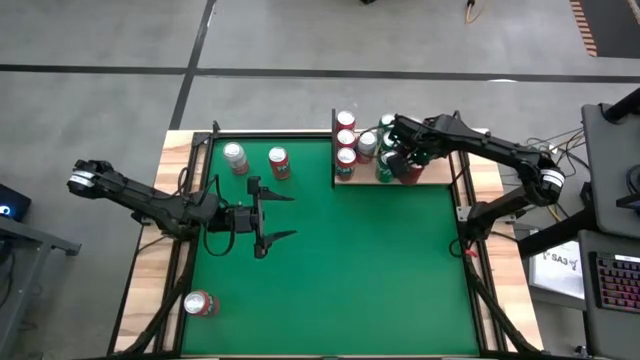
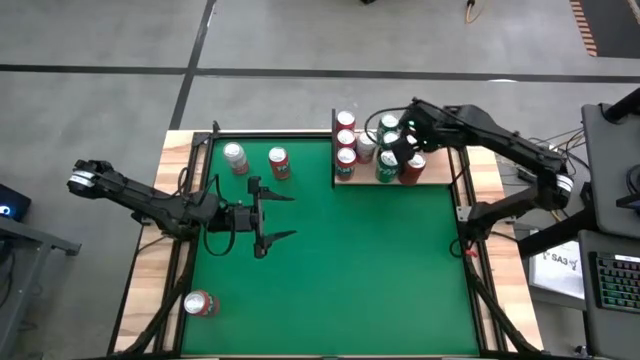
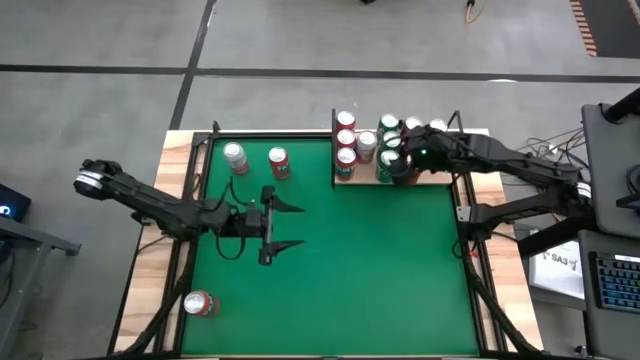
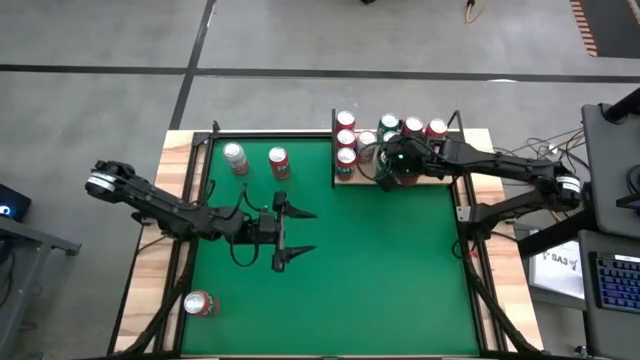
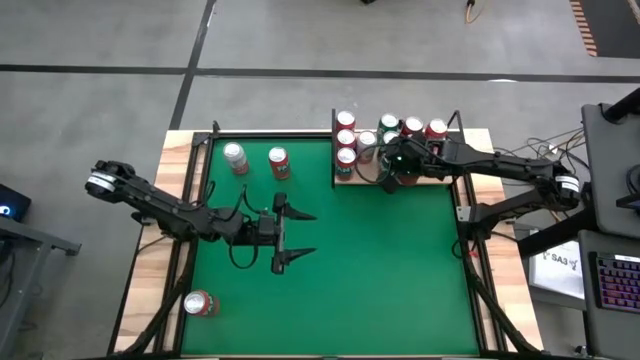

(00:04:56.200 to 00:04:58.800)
Task: Place canned beverage on shelf
Adjust the green soda cans on the shelf

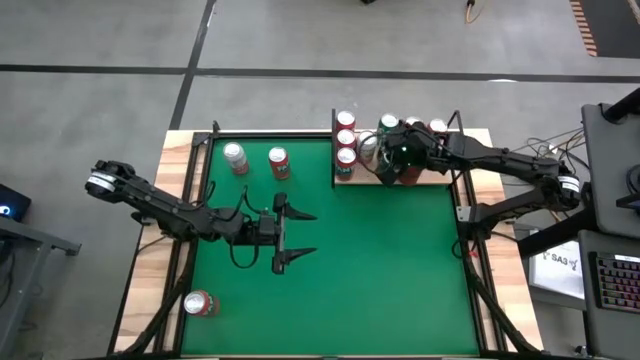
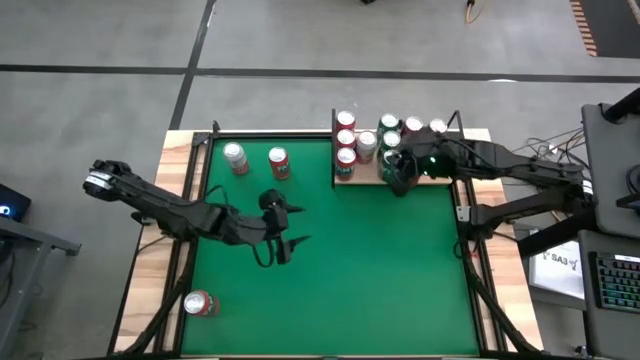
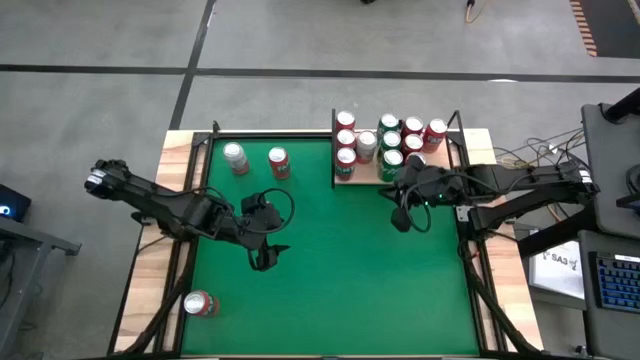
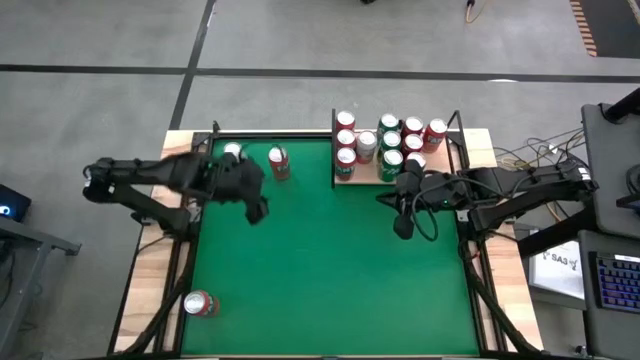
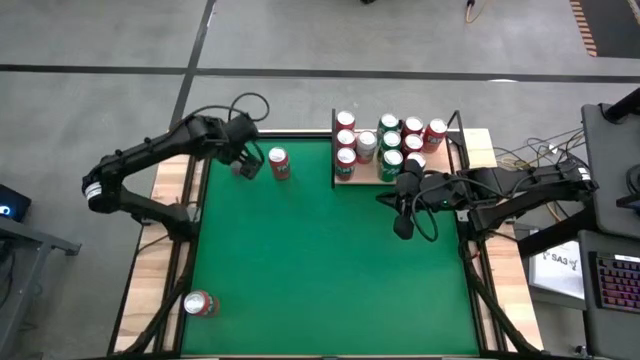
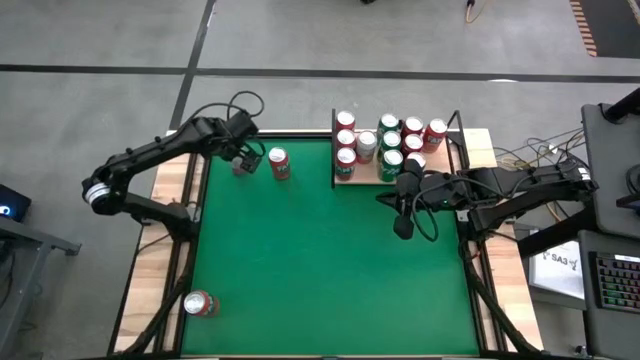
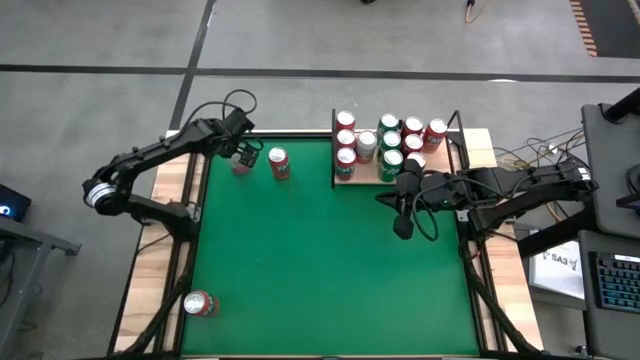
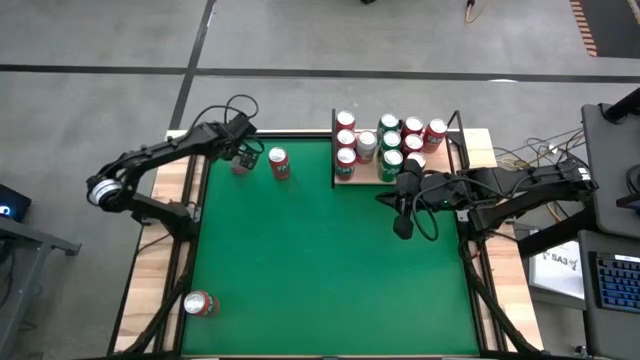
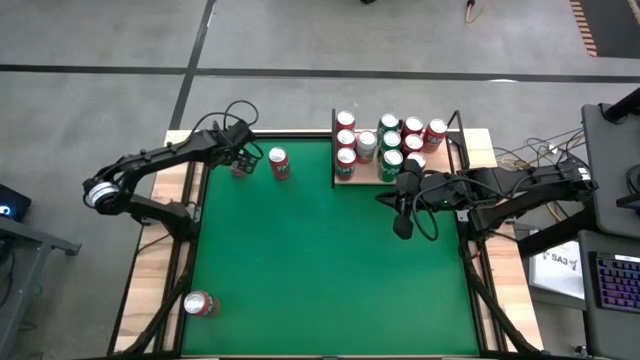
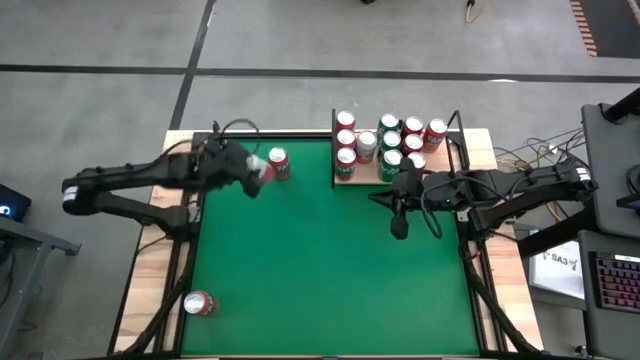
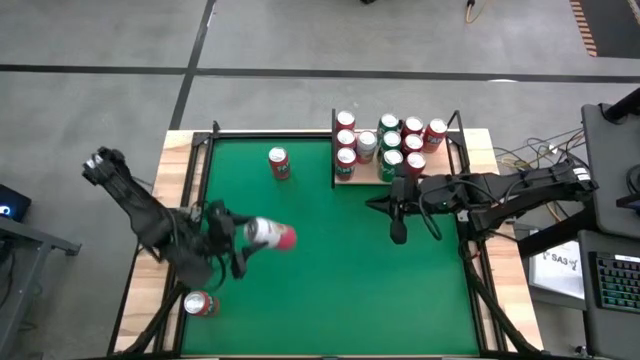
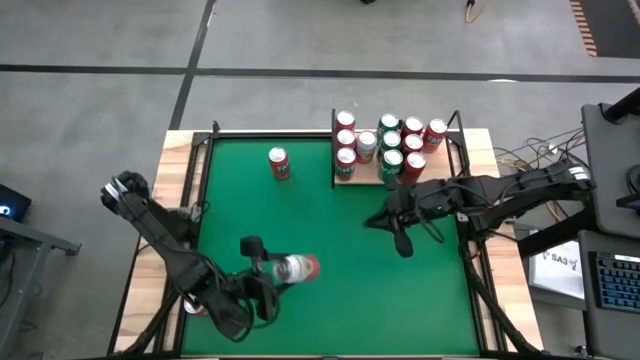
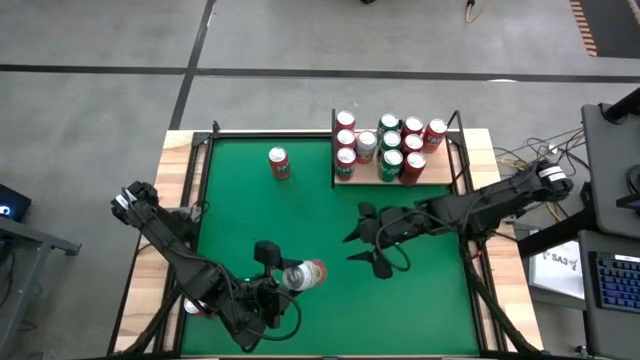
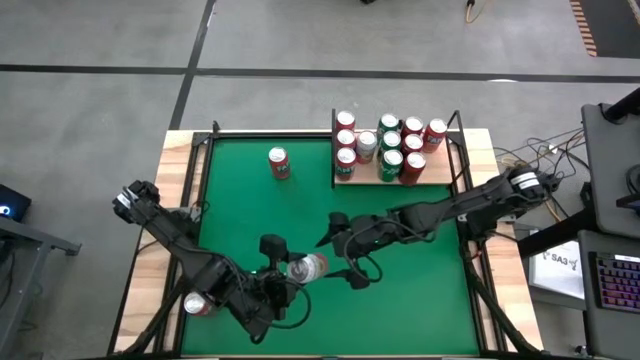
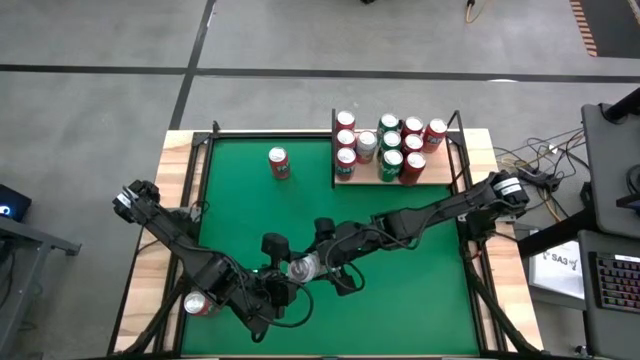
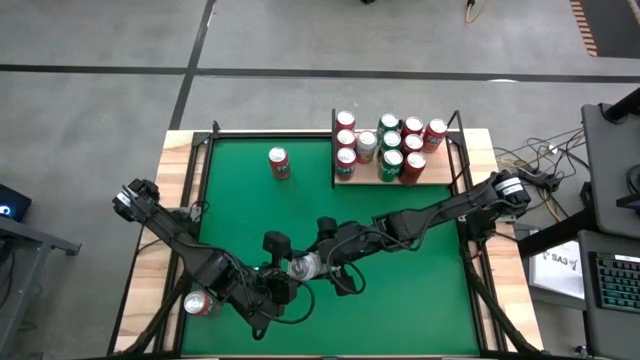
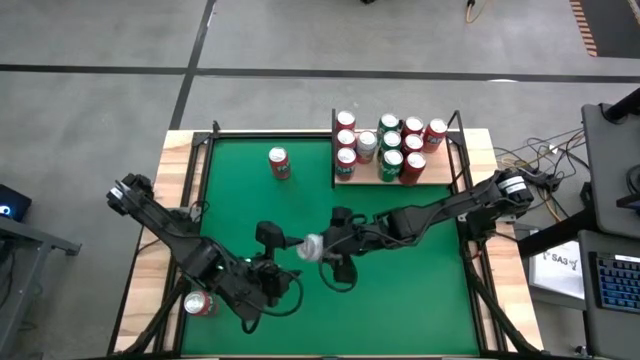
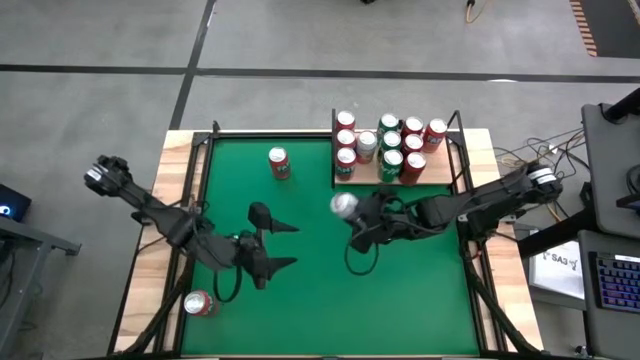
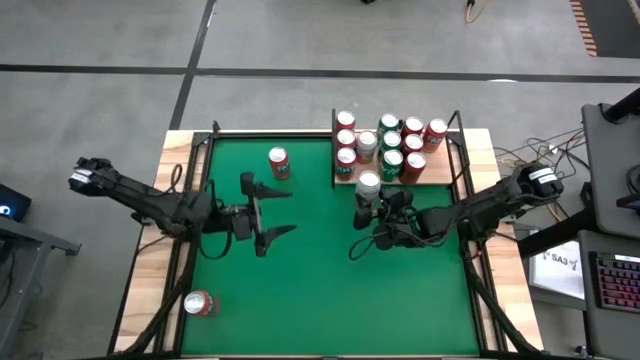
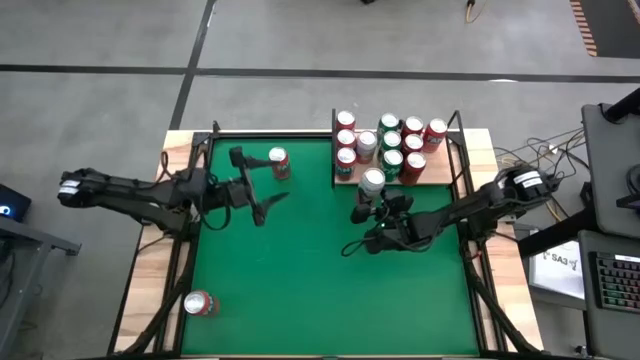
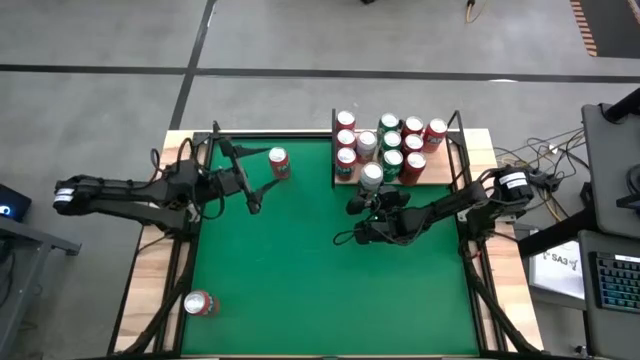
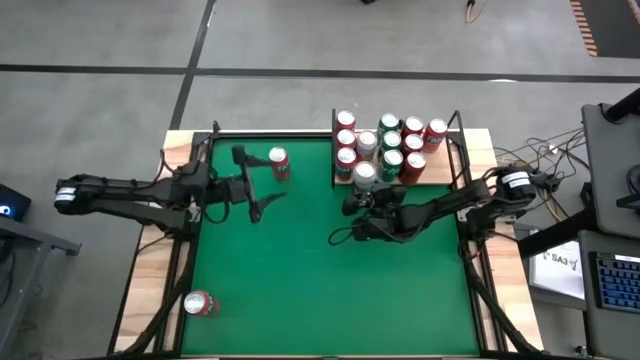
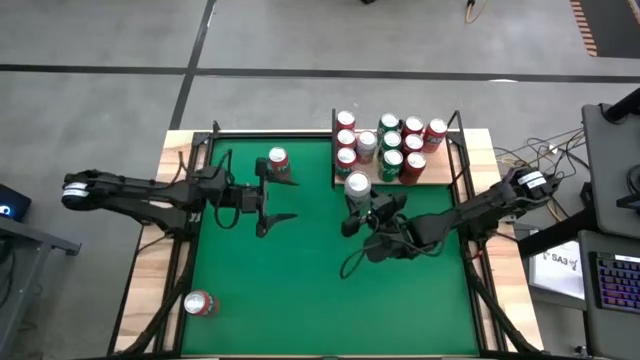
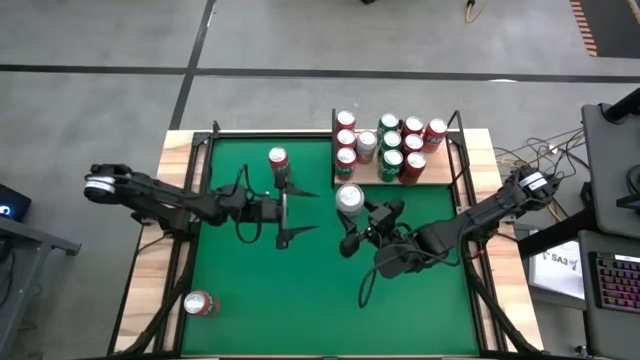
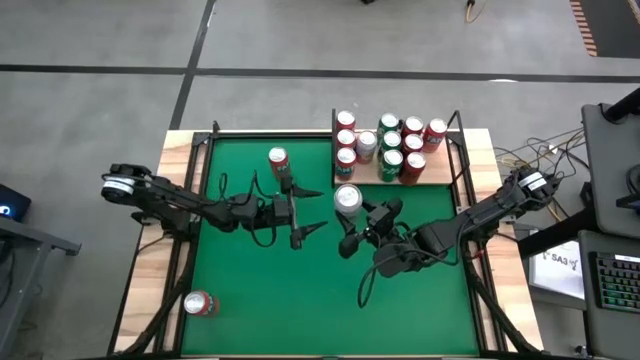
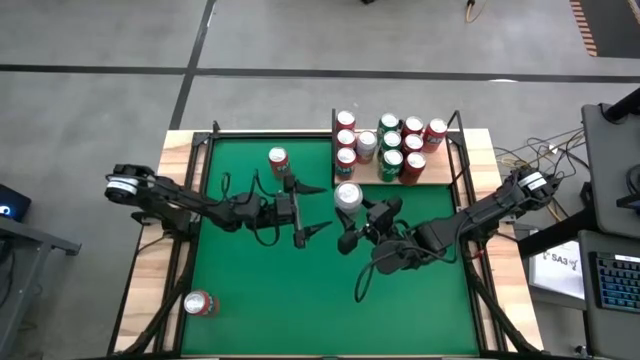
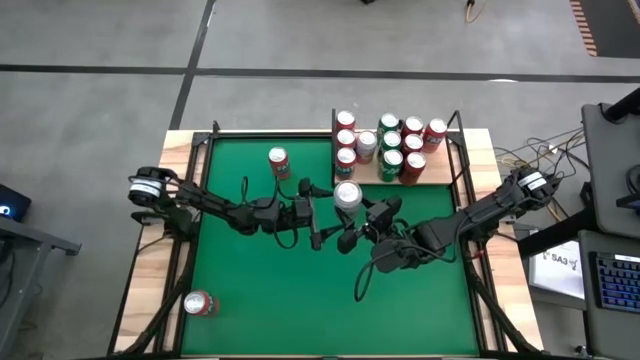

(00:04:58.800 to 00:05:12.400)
Put the pink/white soda can on the shelf aligned with the other pink/white soda can
